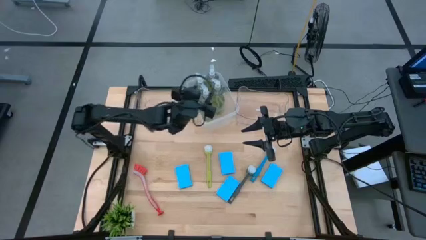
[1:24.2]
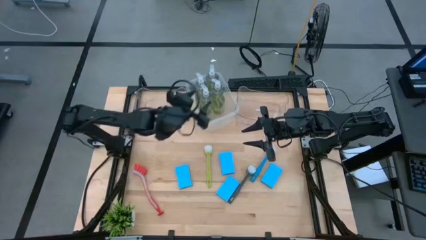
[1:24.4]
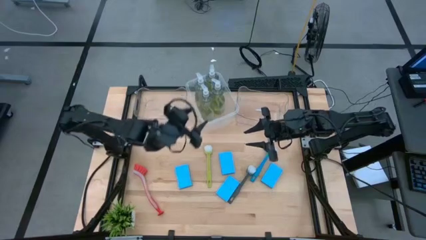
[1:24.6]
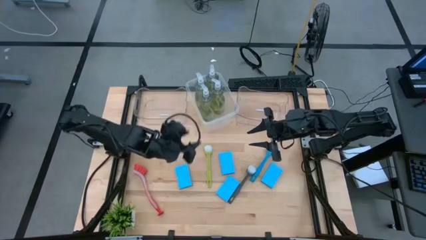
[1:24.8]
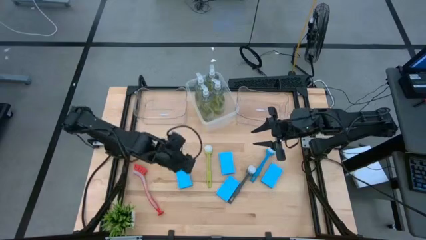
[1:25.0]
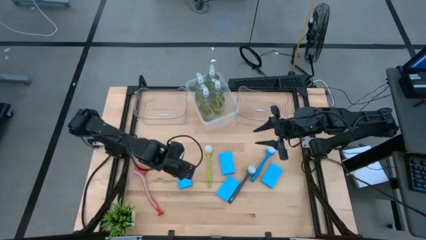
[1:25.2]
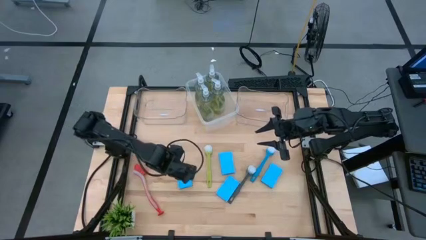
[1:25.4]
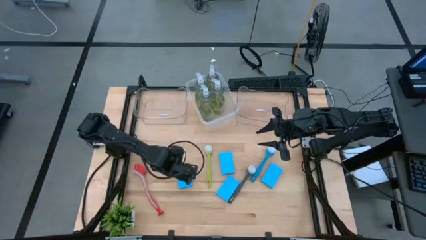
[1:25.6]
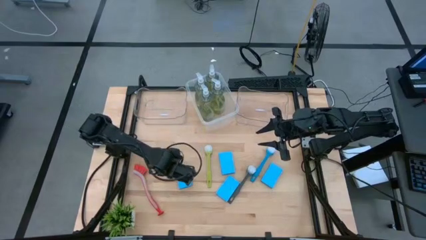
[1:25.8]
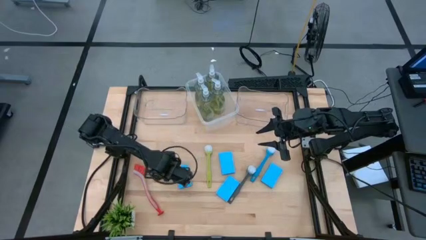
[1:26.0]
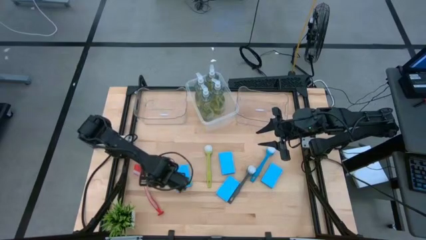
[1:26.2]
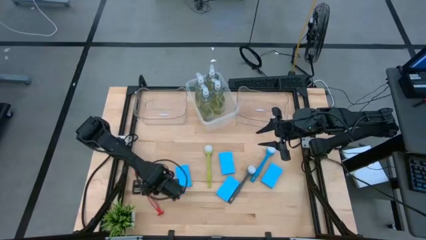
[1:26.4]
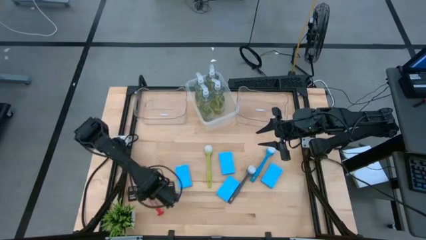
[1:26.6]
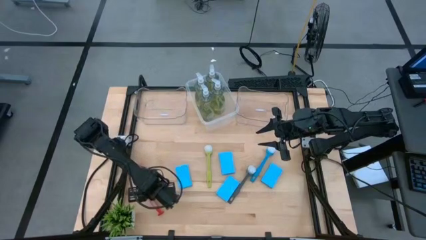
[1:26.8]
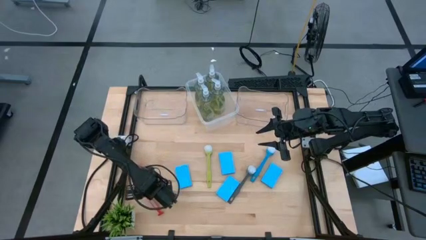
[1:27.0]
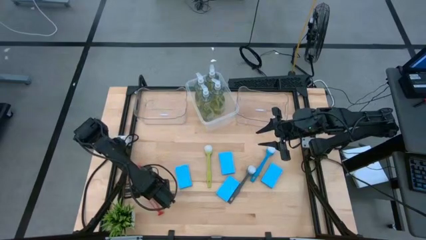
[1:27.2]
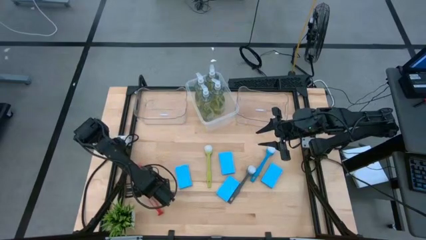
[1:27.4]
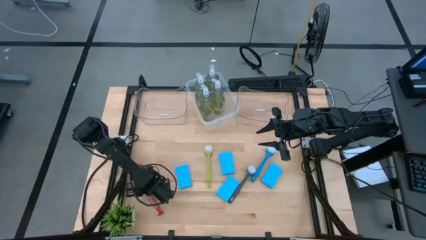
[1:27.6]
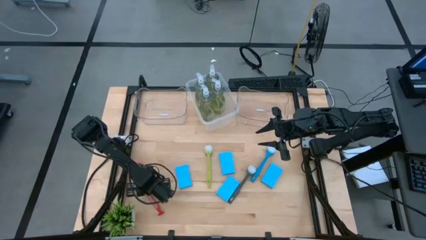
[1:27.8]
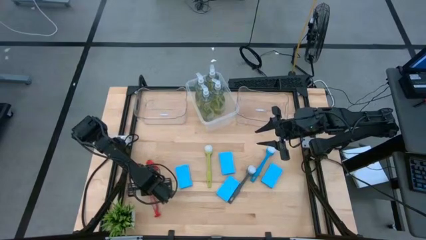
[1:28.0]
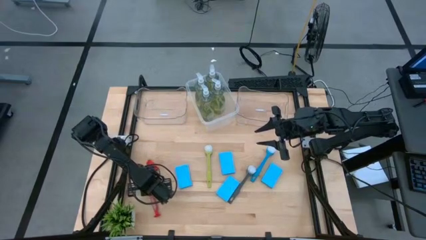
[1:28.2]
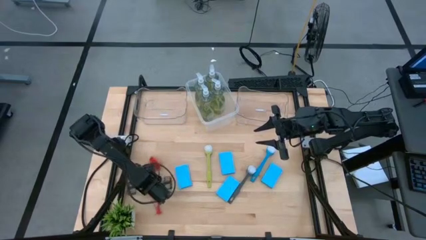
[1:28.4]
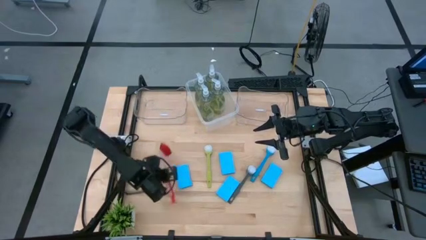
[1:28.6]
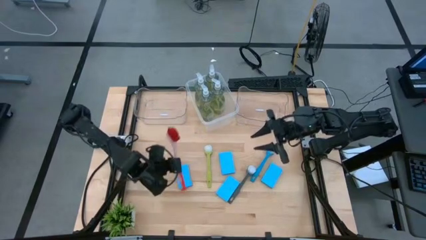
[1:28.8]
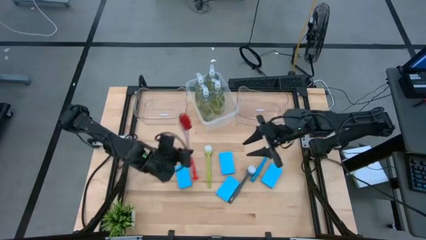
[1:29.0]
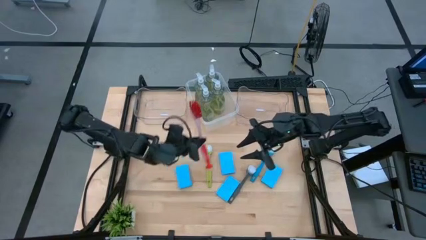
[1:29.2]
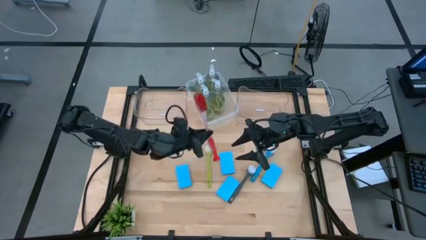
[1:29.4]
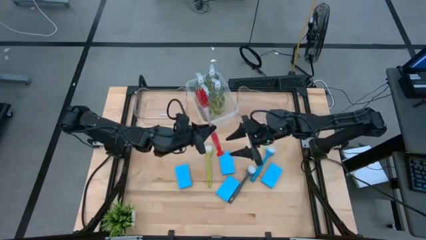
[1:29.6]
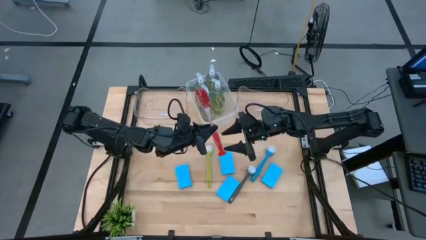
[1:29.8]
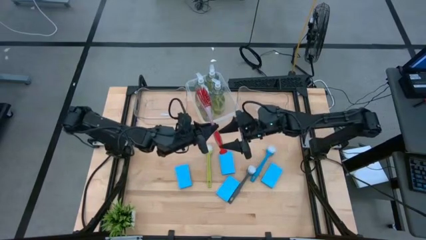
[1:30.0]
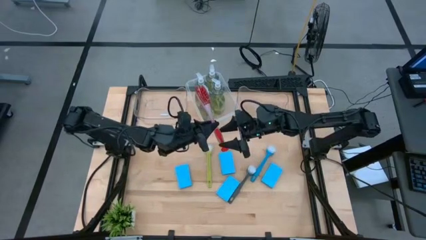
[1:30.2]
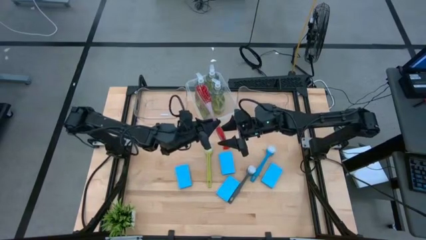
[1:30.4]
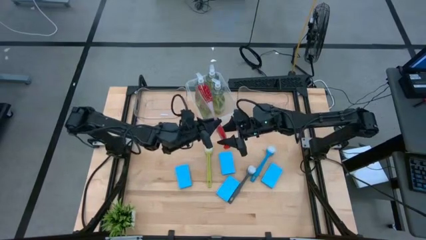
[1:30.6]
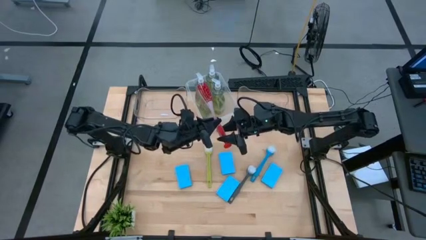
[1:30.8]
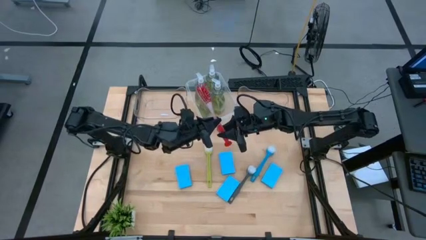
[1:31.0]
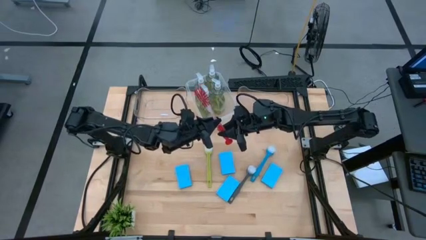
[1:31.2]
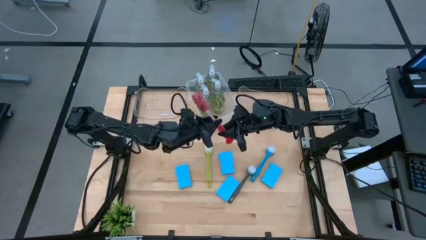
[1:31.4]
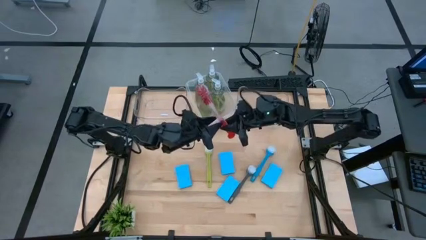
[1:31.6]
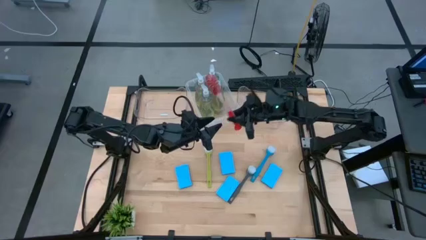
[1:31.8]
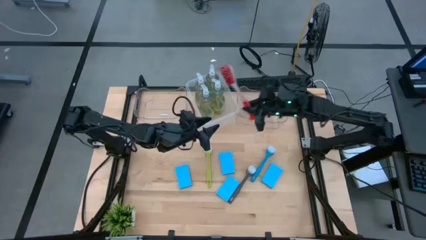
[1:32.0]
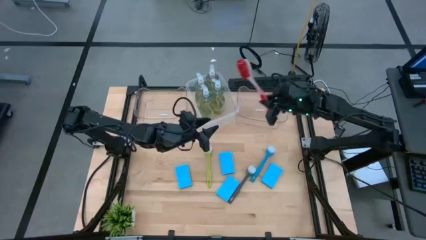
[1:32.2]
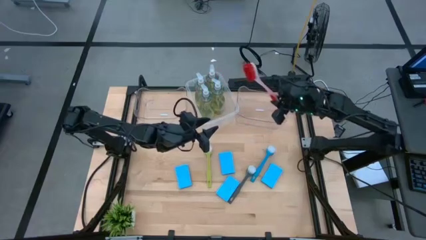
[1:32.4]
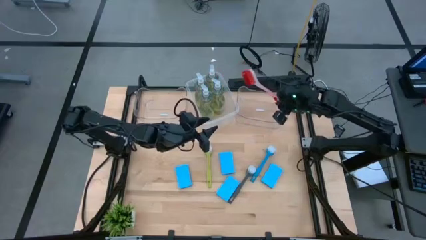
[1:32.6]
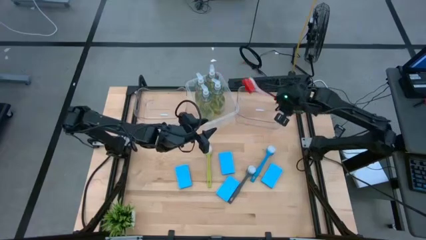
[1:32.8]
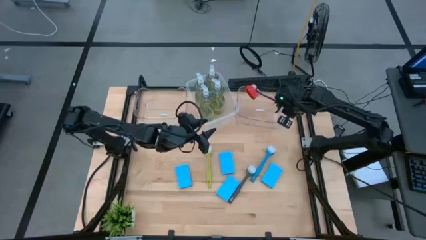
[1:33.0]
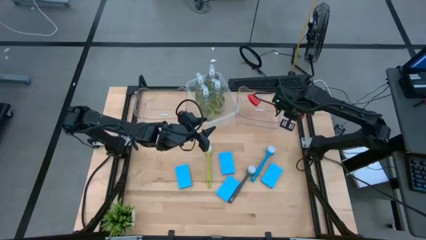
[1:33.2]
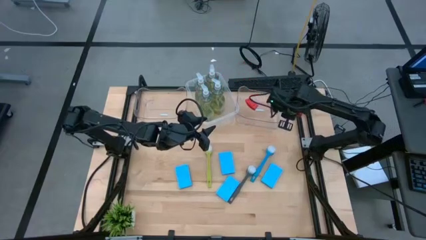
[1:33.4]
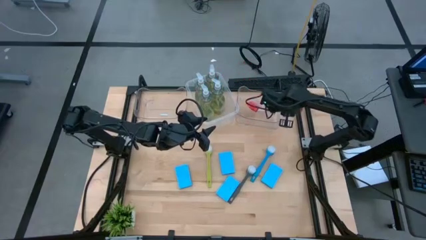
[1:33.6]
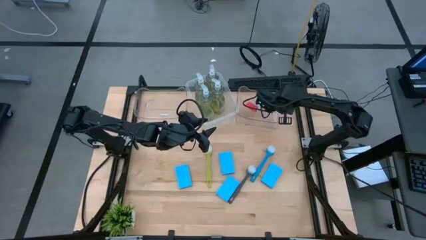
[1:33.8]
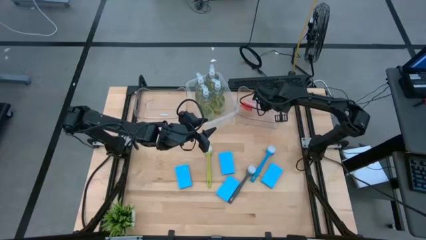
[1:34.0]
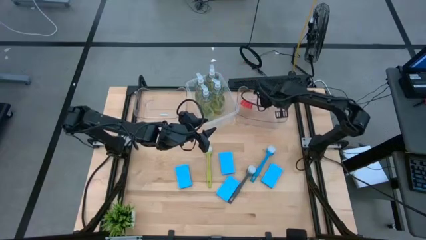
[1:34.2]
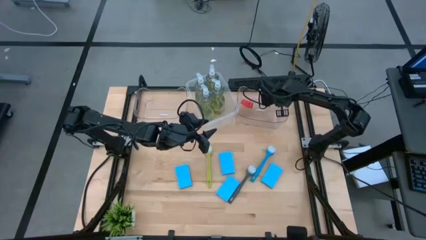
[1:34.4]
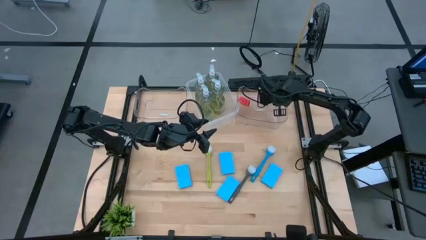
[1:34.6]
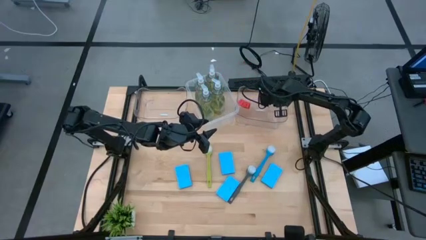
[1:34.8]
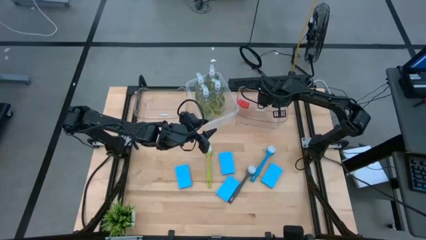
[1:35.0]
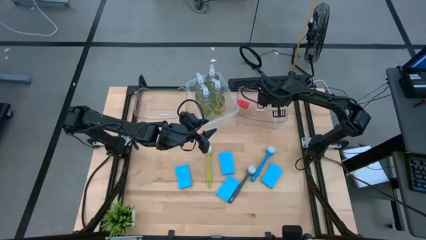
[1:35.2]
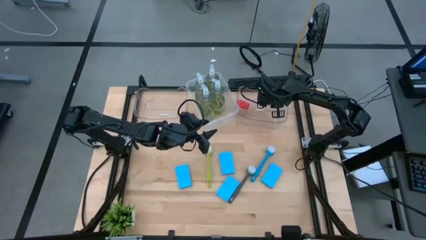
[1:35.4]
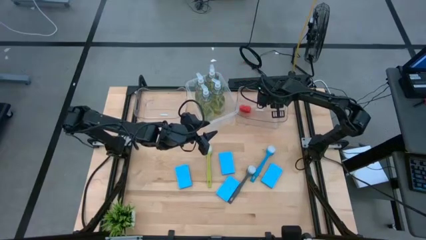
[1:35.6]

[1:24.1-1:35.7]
Task: Pick & Place Kitchen Sink Supplies
Put the red toilet brush into the right transparent bin
